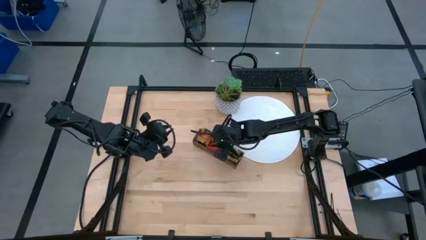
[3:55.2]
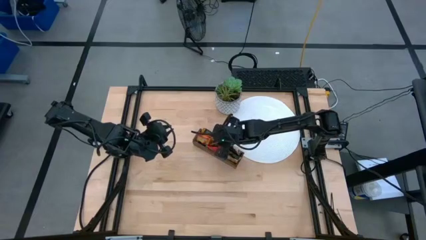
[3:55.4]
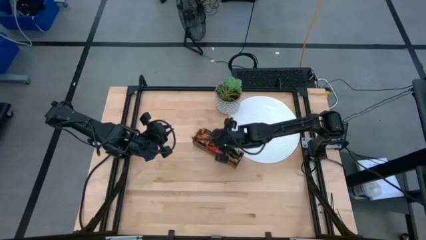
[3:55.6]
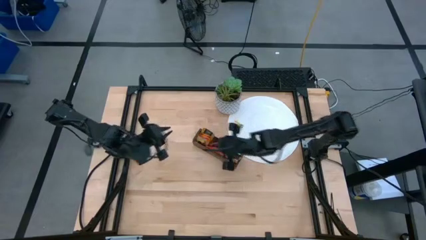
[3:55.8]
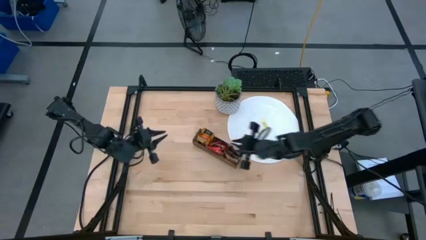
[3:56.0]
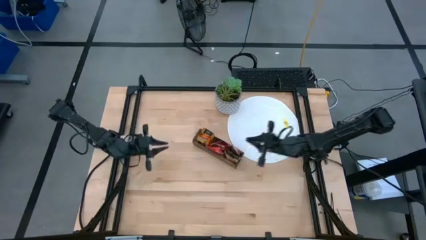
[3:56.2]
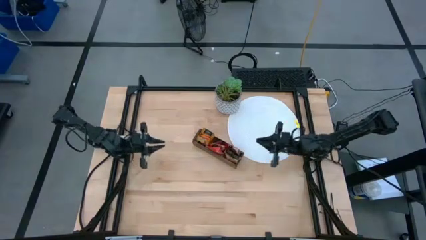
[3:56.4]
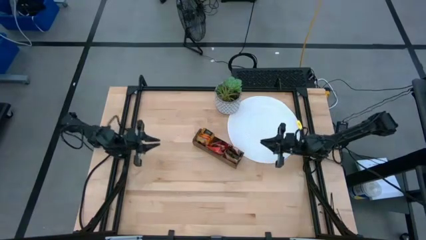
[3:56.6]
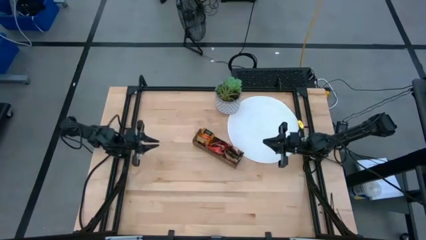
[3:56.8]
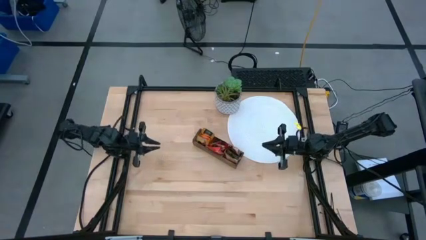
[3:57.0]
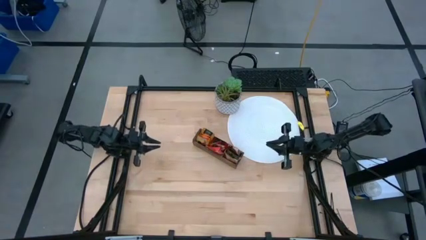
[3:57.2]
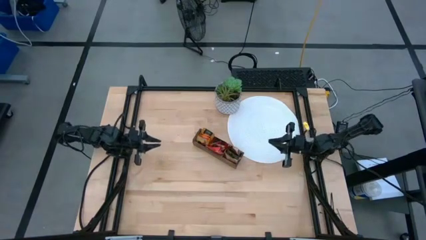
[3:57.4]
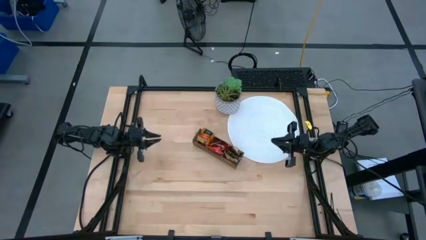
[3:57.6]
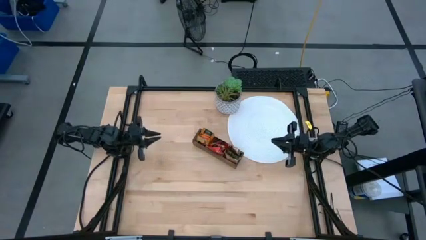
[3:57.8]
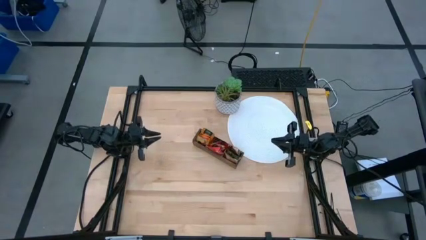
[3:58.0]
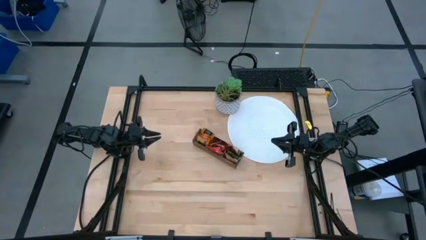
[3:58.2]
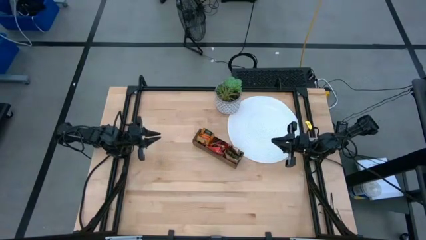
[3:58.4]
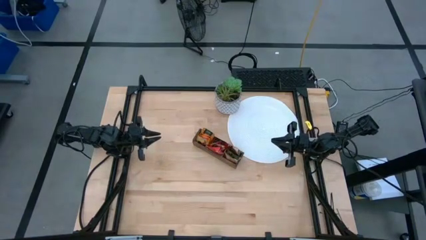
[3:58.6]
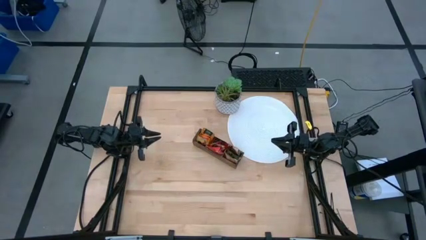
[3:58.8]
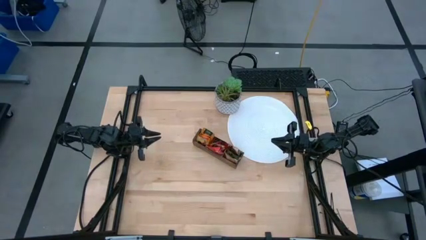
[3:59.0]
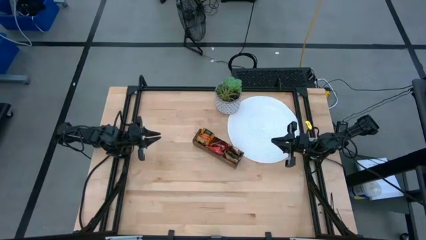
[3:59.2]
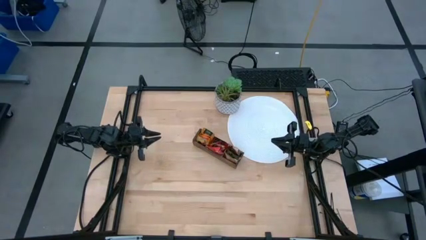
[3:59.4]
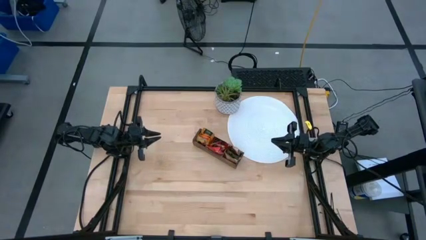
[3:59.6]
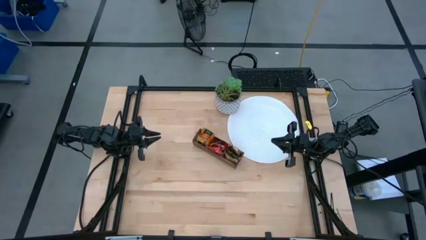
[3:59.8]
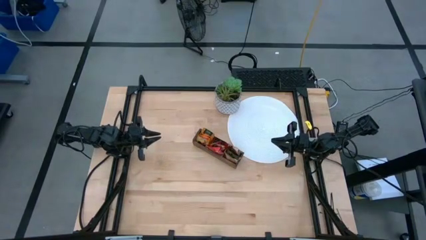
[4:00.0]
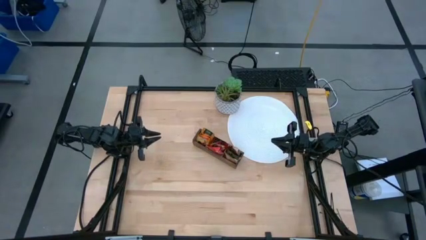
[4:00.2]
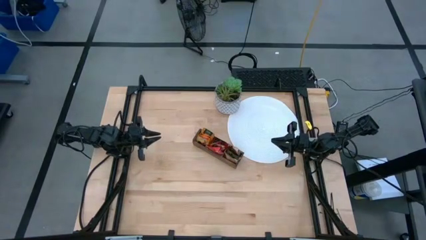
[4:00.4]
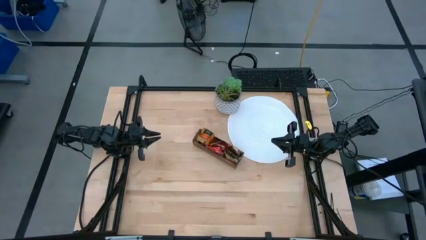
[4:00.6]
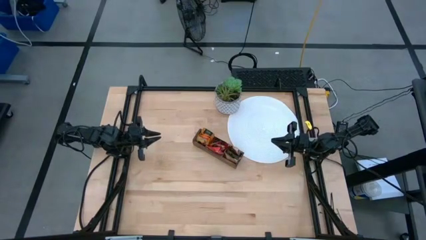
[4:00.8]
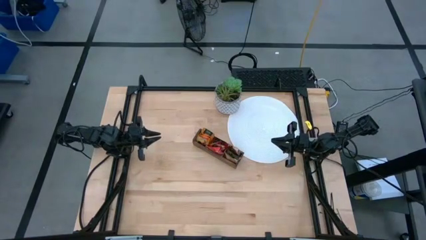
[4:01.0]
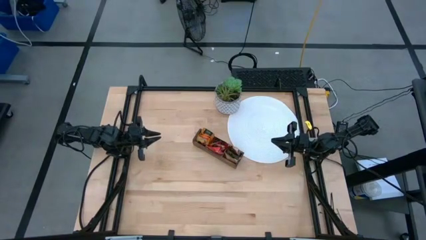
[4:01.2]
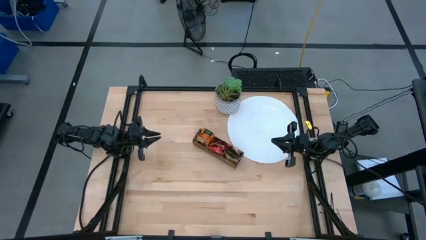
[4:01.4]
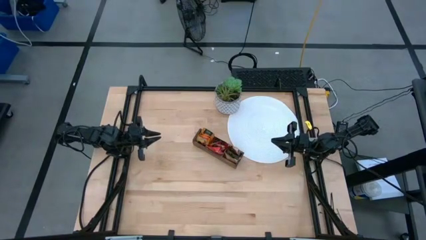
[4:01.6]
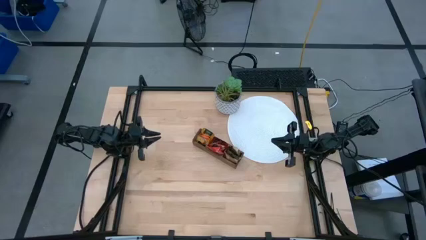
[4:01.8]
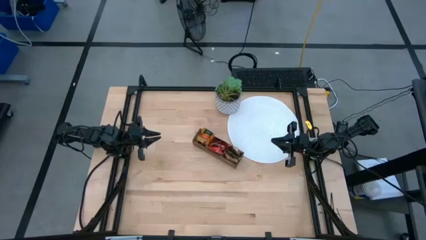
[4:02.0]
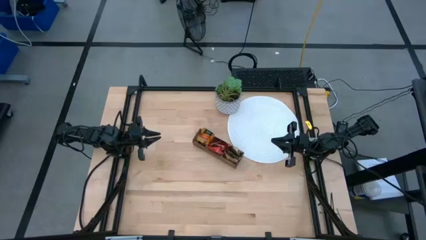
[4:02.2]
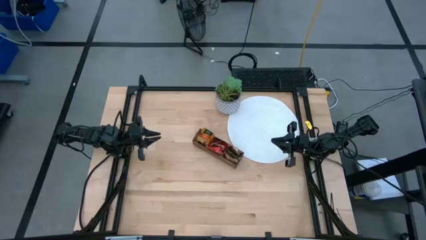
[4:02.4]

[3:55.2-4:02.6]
Task: Pick & Place Tea
Return to home position

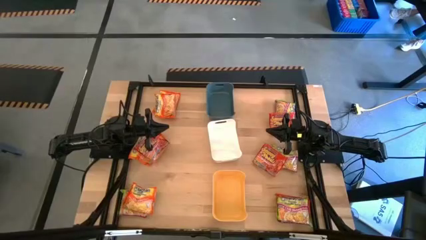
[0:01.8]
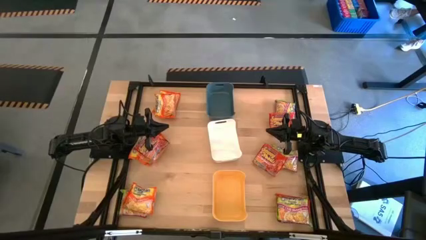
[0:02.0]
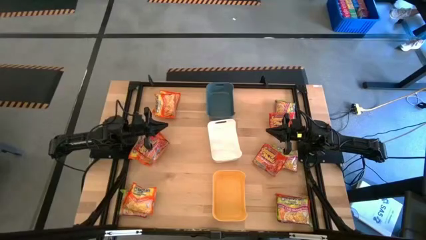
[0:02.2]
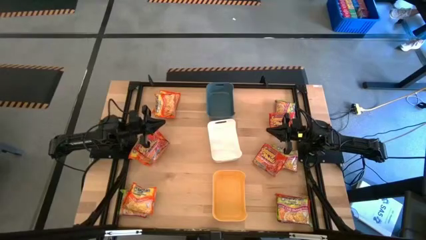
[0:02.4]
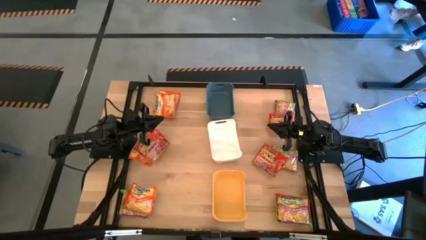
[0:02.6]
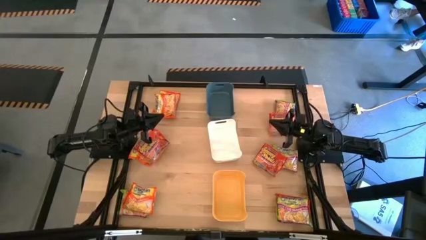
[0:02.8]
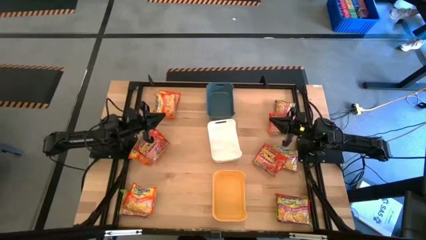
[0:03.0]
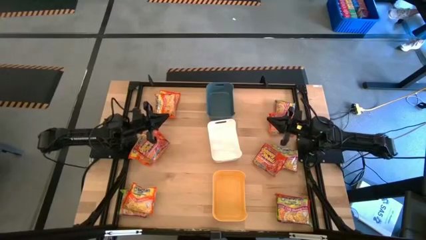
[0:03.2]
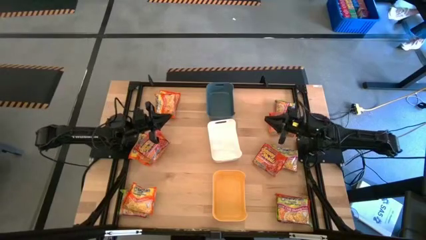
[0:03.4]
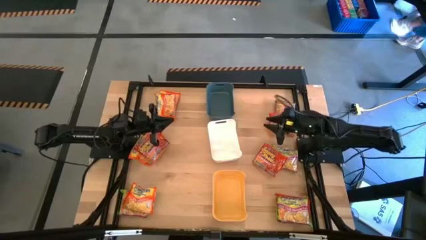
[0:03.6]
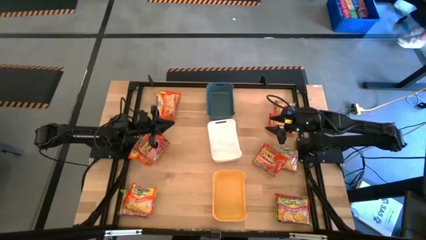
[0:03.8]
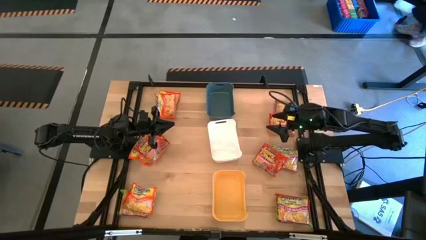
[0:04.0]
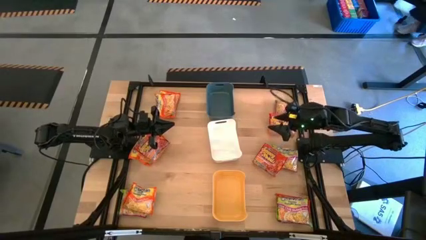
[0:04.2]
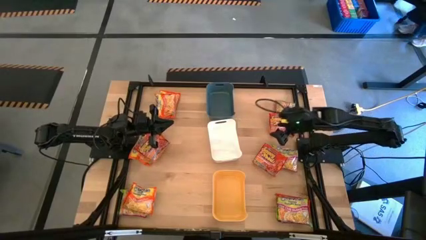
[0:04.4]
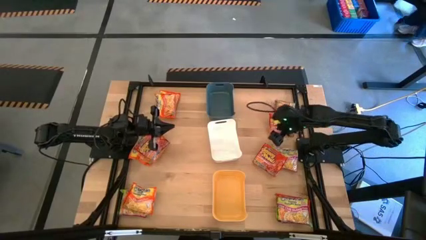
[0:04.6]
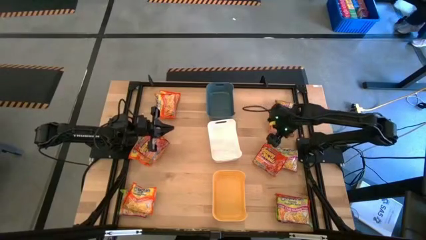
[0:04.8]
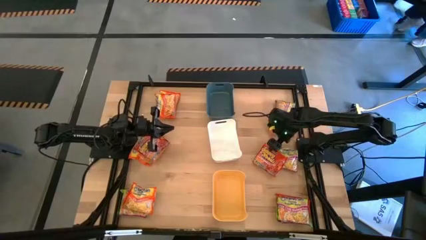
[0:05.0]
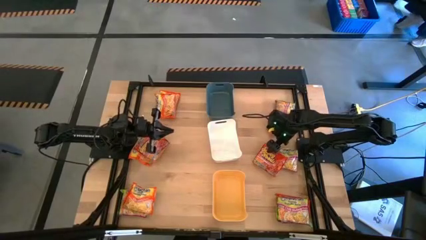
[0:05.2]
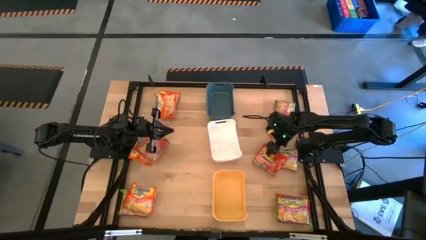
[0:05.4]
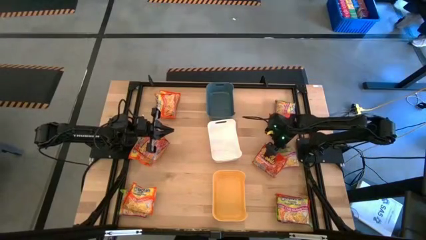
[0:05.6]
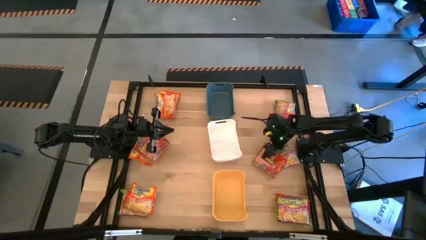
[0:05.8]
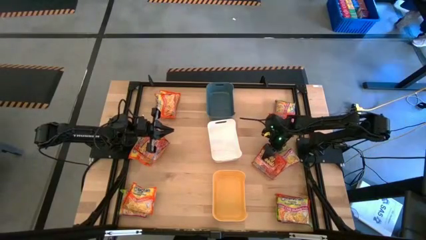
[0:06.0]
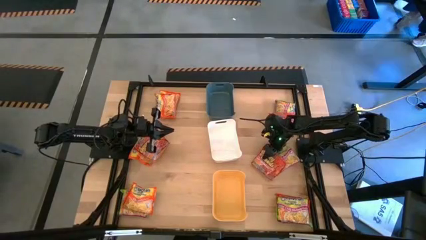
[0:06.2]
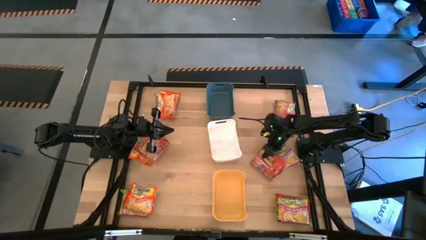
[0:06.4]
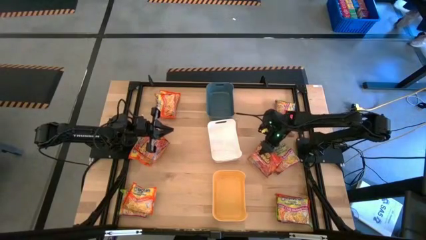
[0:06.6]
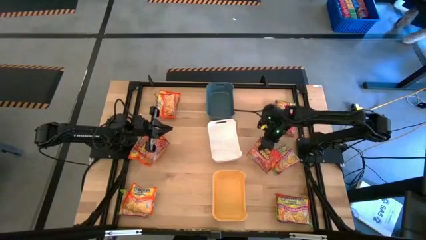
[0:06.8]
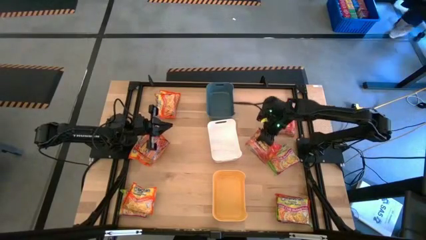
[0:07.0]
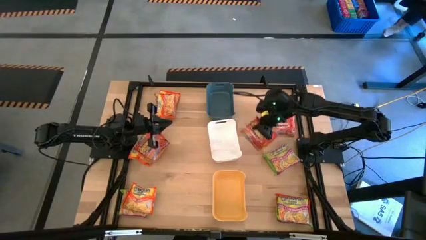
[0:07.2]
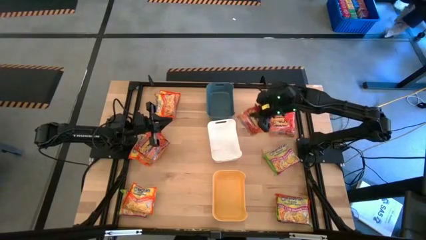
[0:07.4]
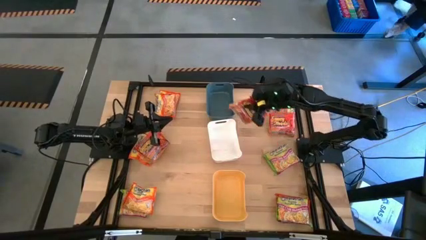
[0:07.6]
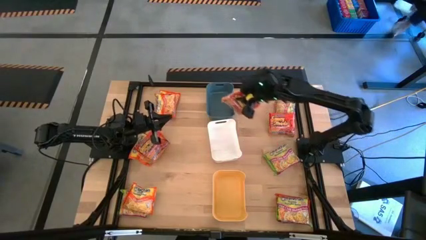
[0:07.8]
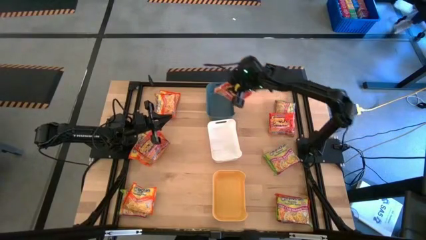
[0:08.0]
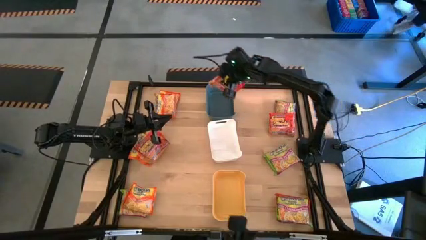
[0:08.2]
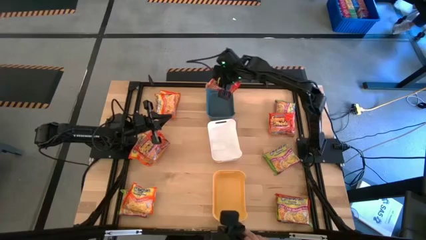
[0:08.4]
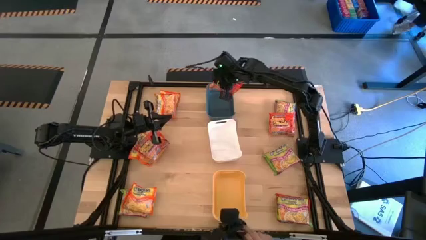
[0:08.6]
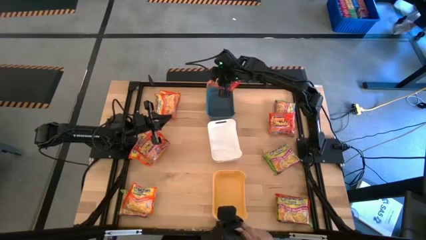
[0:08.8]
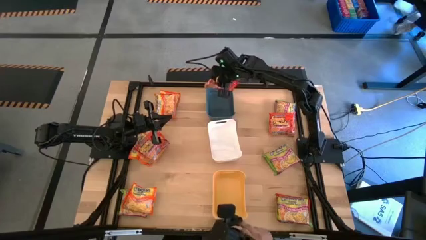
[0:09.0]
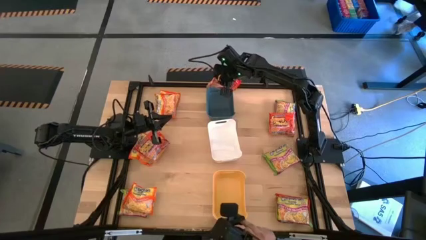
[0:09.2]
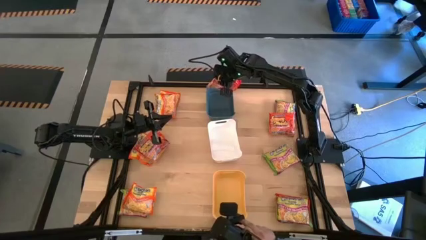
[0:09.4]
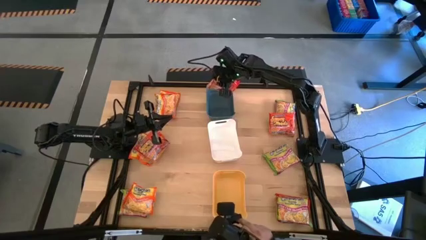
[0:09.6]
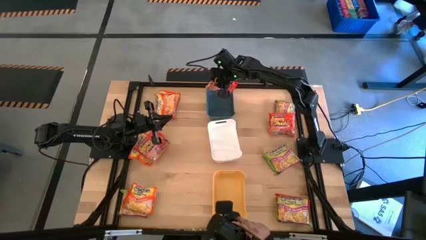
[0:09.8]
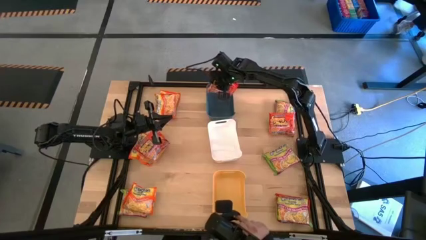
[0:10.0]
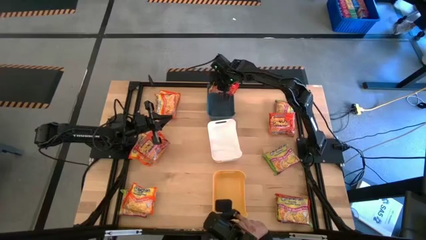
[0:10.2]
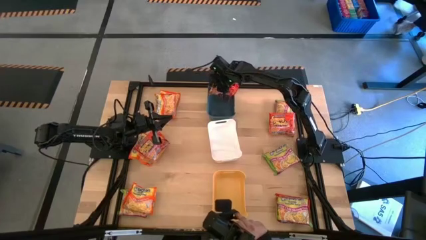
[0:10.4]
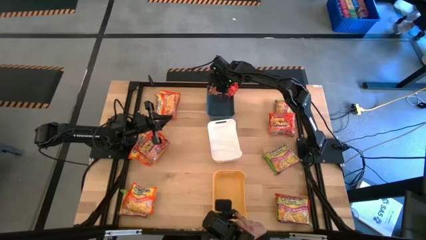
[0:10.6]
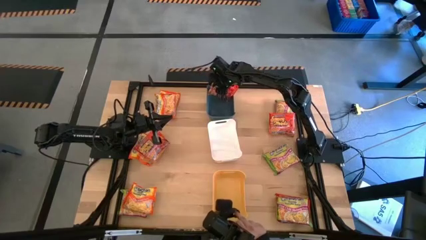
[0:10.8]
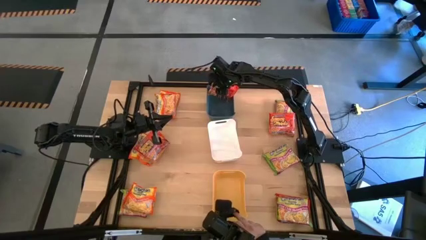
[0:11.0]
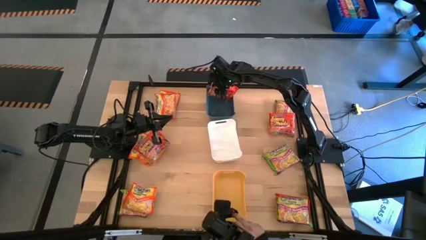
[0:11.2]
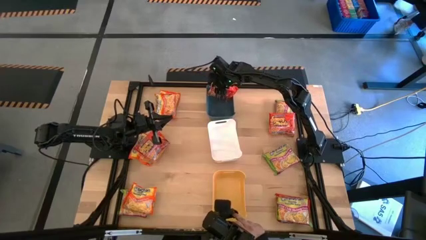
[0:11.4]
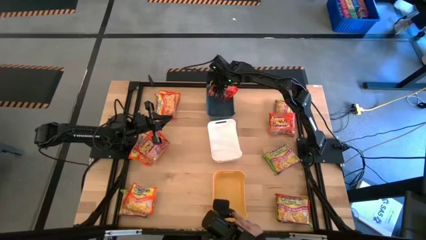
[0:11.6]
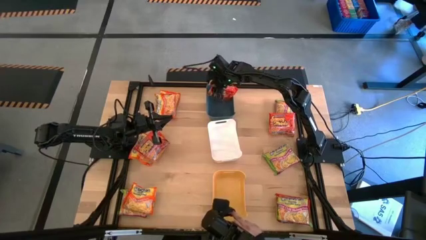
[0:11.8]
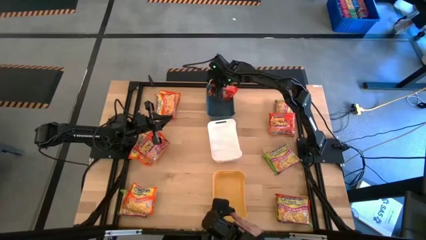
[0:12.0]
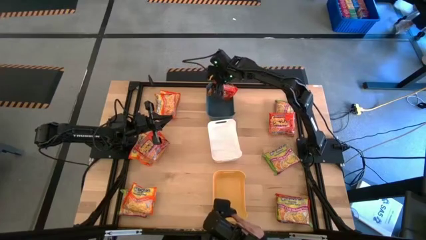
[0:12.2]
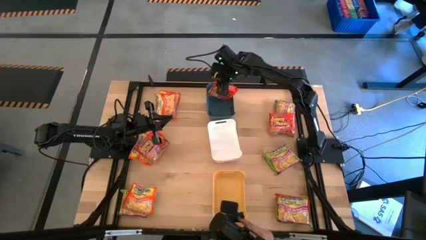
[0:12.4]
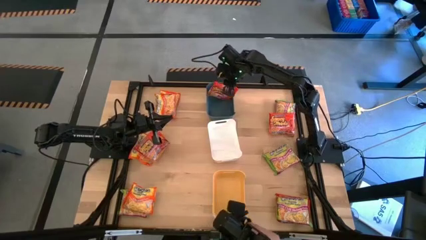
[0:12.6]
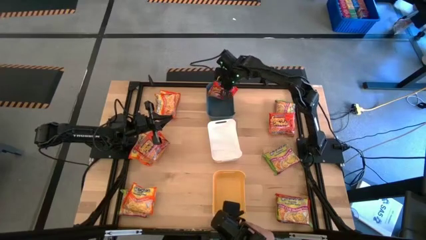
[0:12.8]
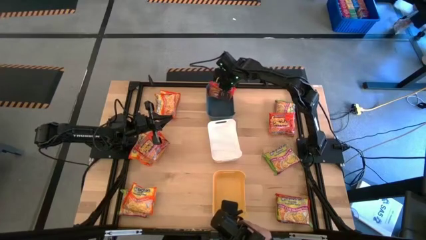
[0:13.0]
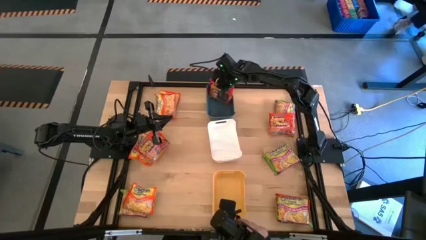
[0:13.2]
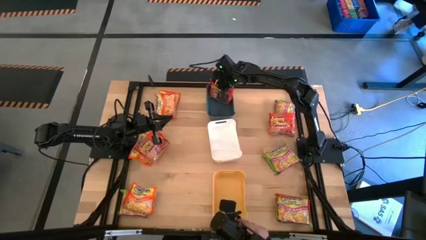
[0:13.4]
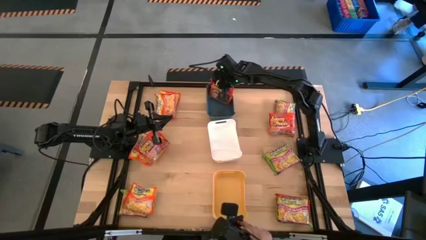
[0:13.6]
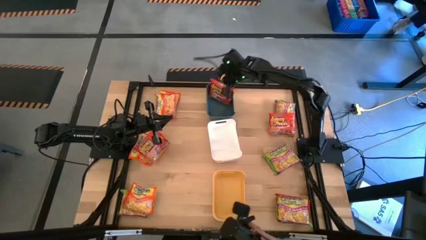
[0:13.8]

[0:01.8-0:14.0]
Task: Sort Maruchan noodles
Put the red noodle pack into the blue bin
